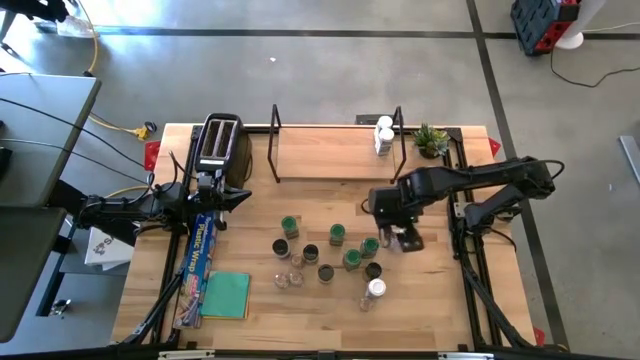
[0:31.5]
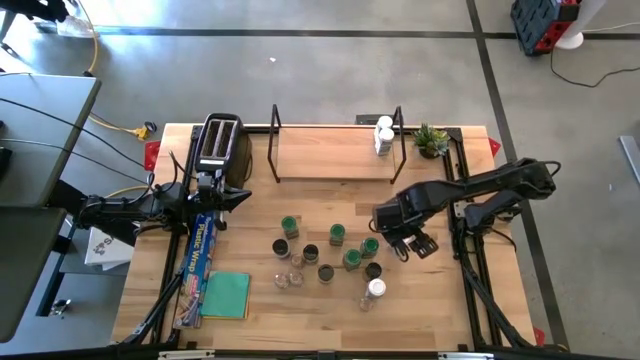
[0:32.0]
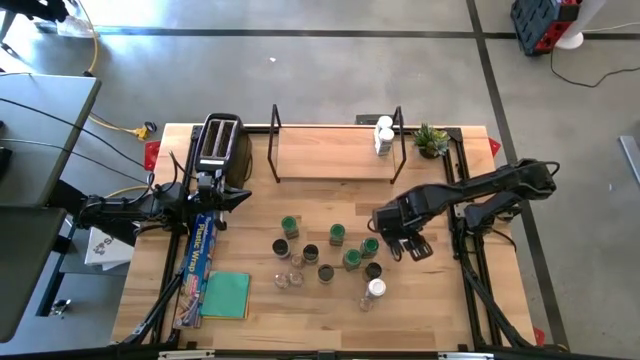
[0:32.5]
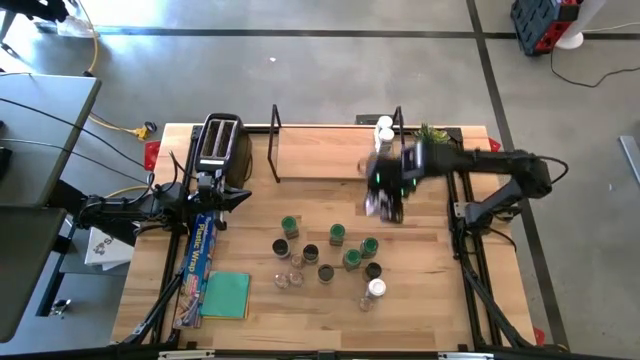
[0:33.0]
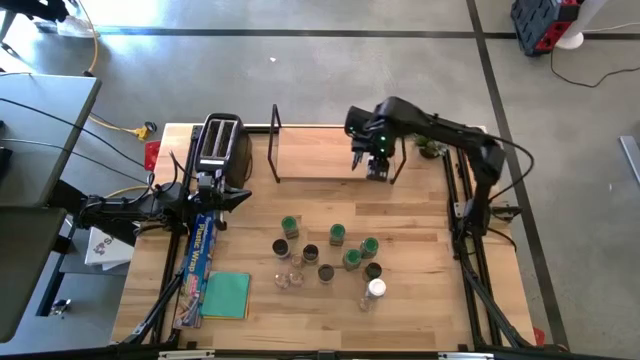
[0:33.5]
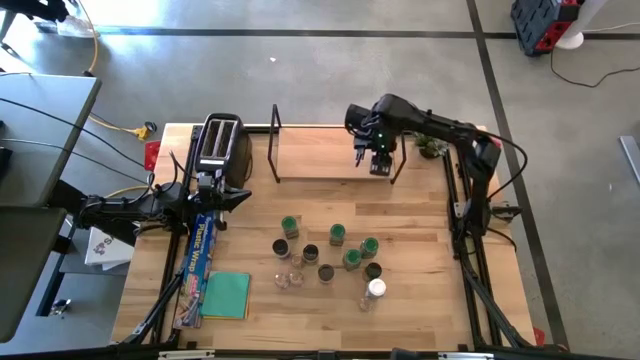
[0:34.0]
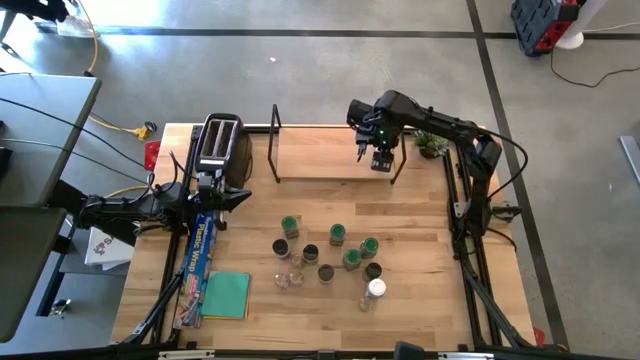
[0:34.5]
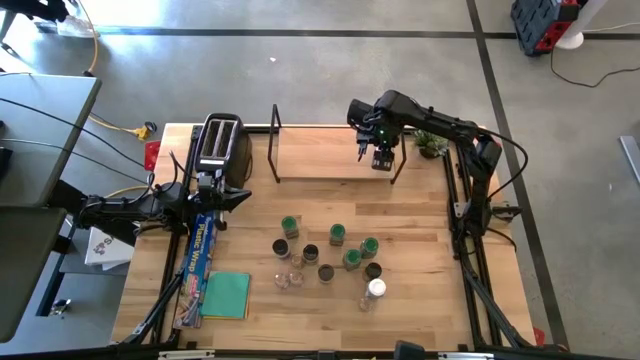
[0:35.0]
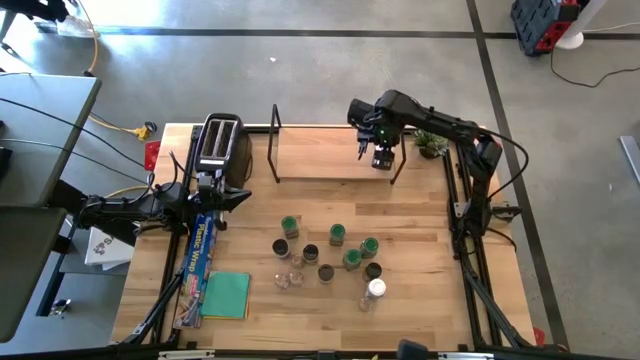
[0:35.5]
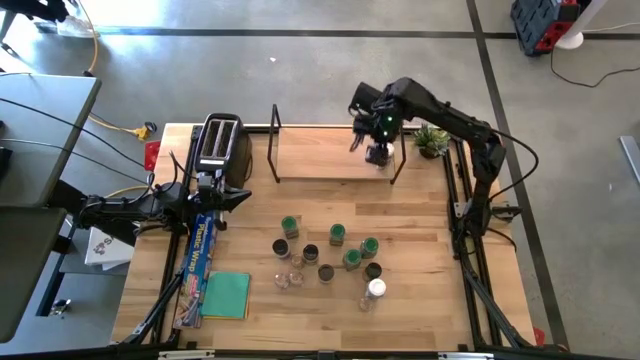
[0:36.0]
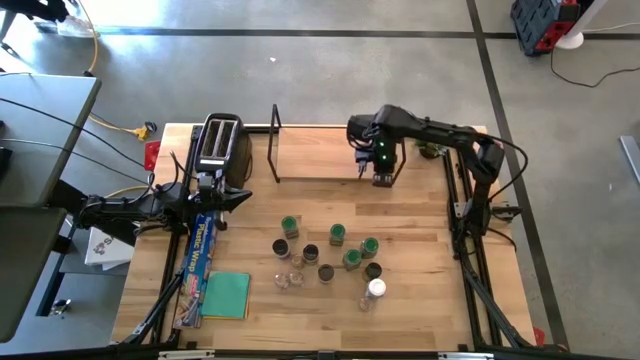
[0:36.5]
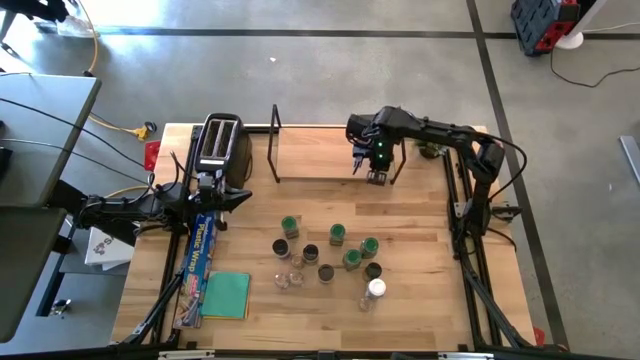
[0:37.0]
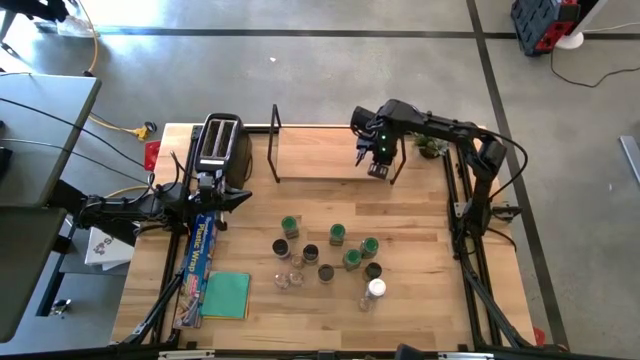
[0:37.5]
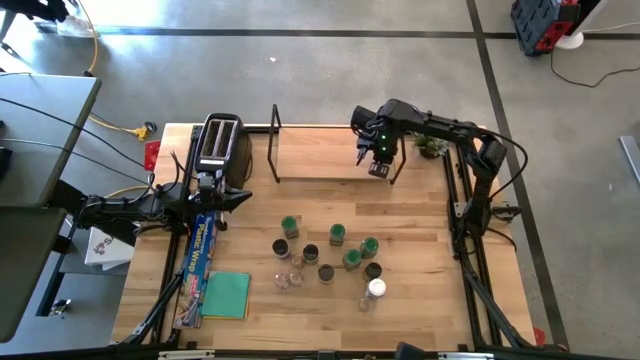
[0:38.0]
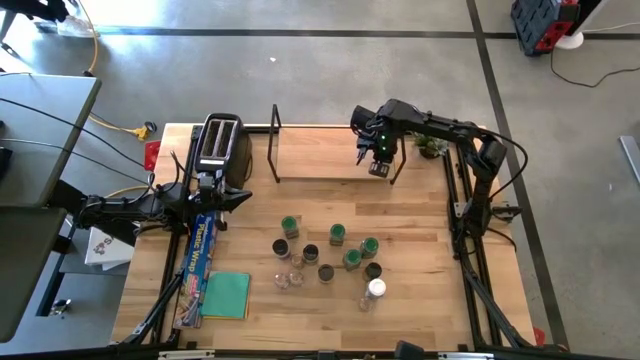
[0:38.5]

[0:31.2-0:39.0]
Task: Shelf spices
Put the white seasoning bottle on the shelf and align it with the other white seasoning bottles

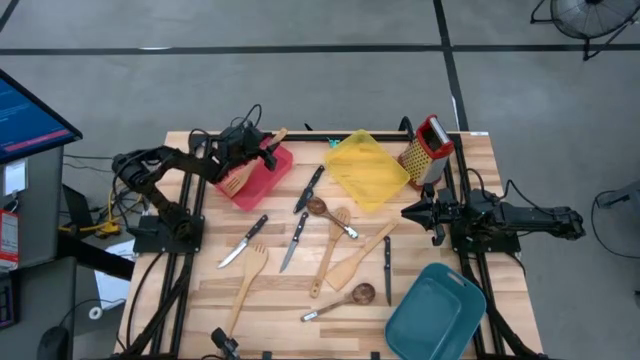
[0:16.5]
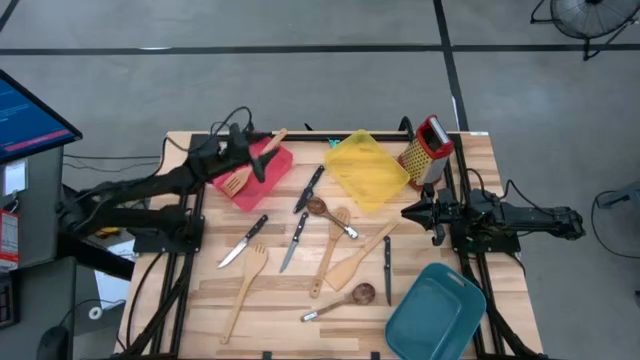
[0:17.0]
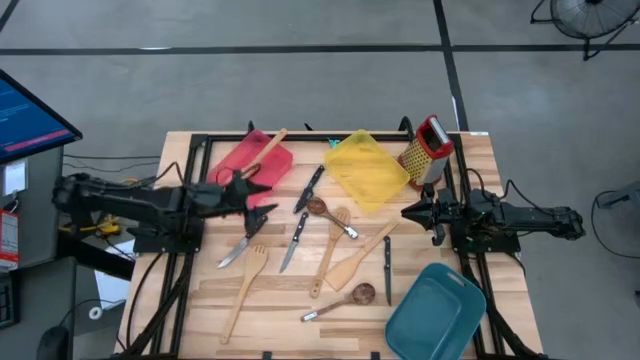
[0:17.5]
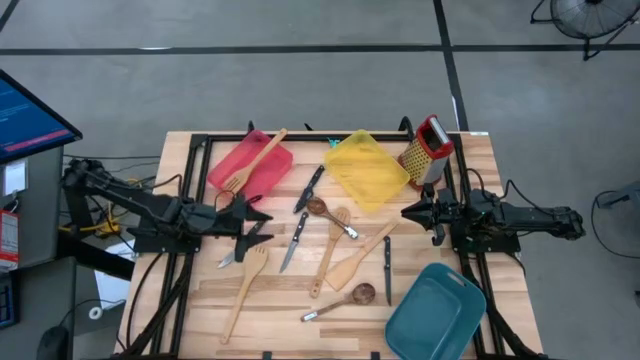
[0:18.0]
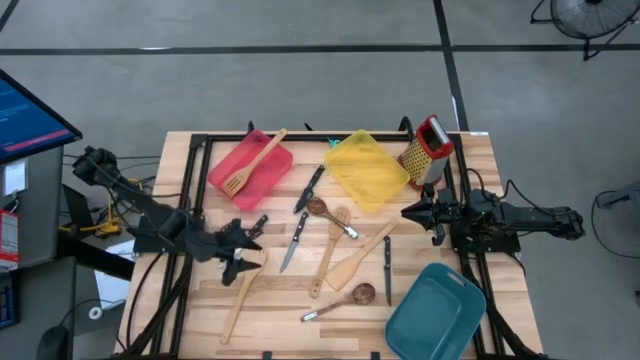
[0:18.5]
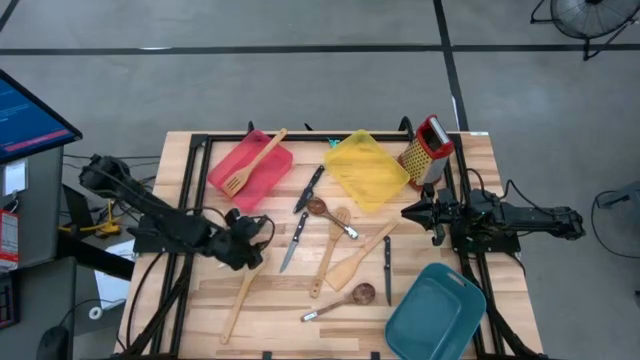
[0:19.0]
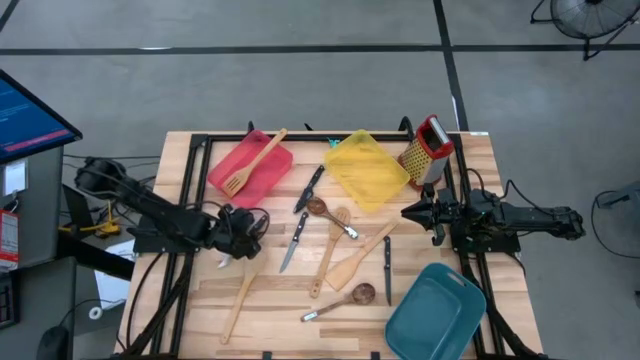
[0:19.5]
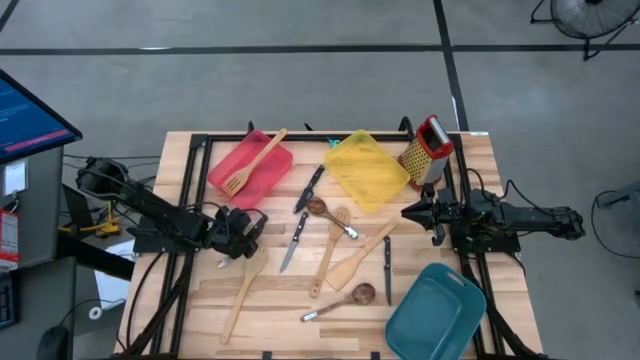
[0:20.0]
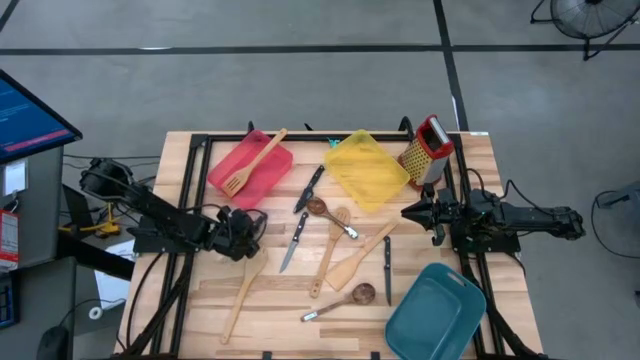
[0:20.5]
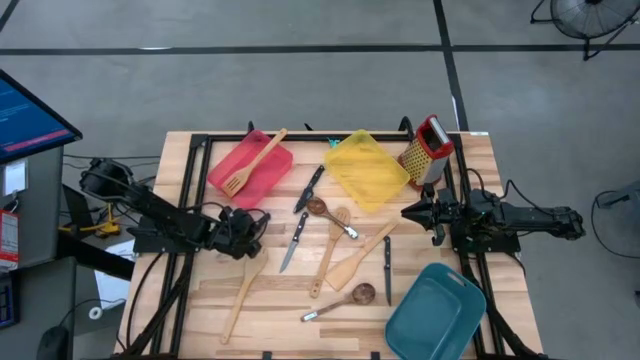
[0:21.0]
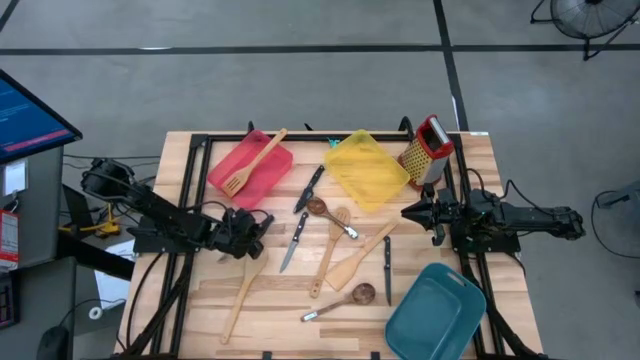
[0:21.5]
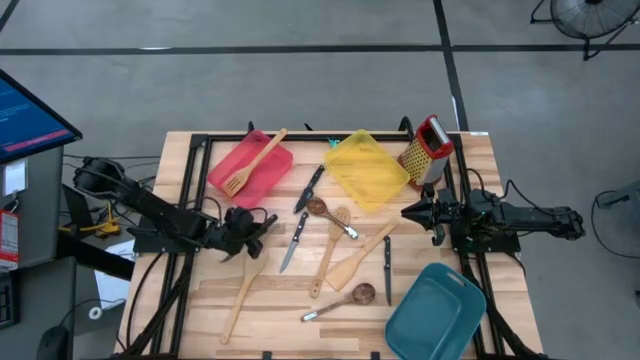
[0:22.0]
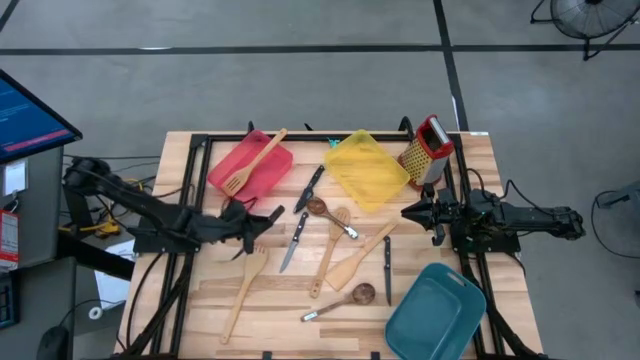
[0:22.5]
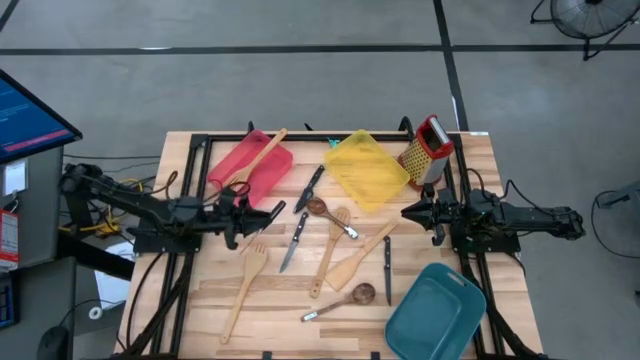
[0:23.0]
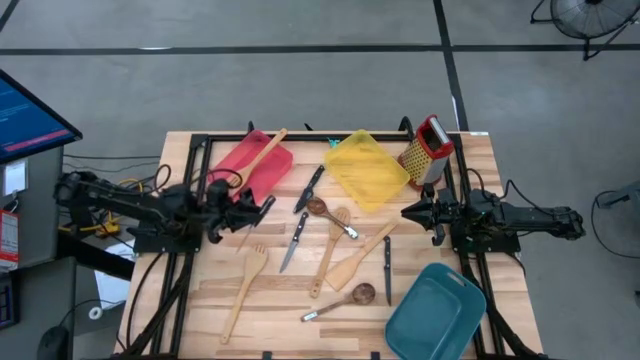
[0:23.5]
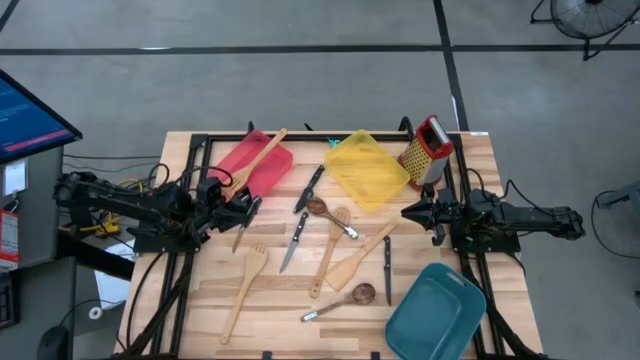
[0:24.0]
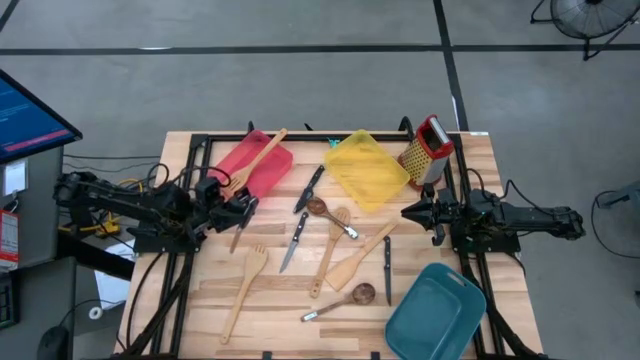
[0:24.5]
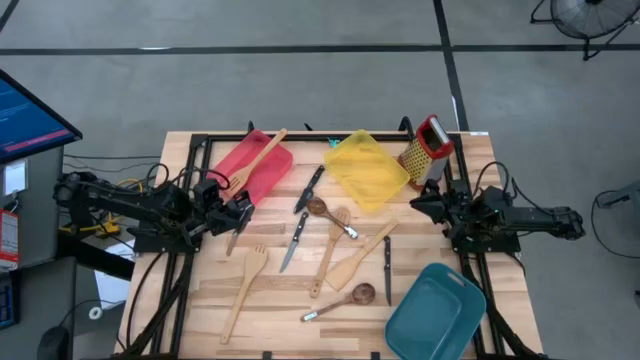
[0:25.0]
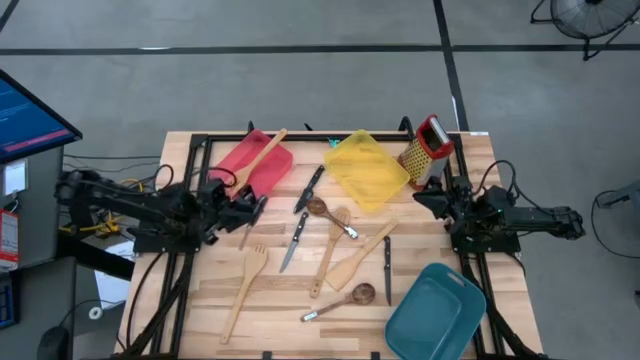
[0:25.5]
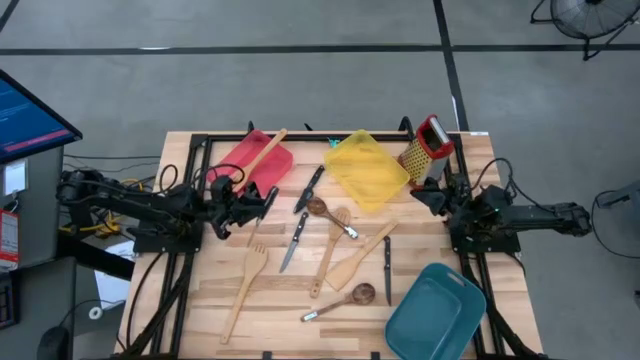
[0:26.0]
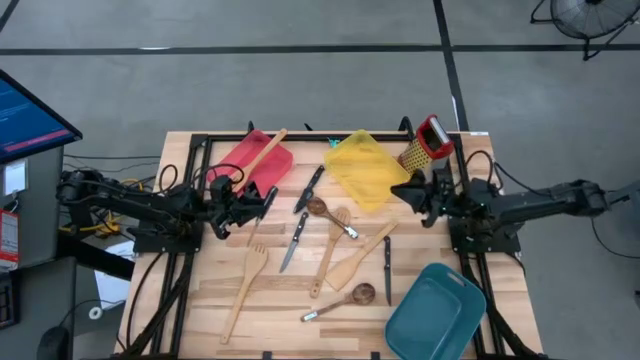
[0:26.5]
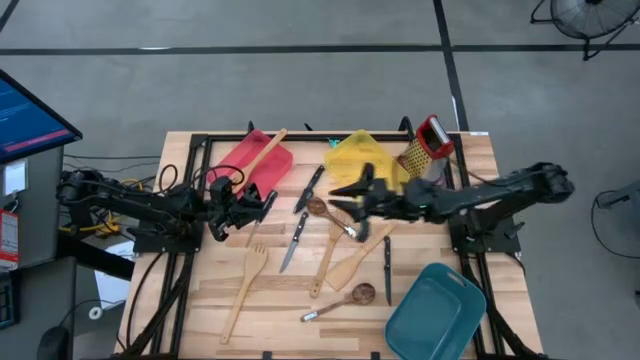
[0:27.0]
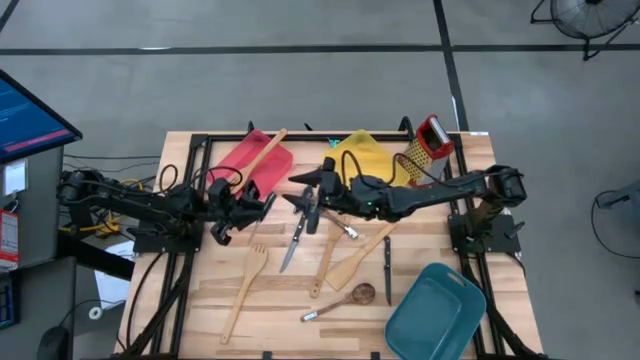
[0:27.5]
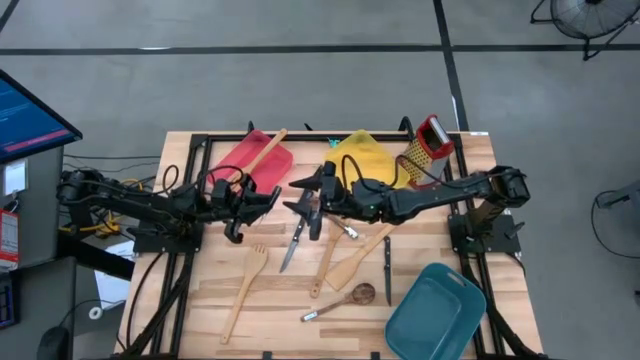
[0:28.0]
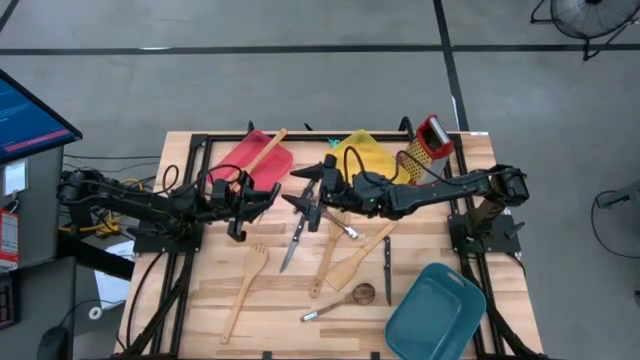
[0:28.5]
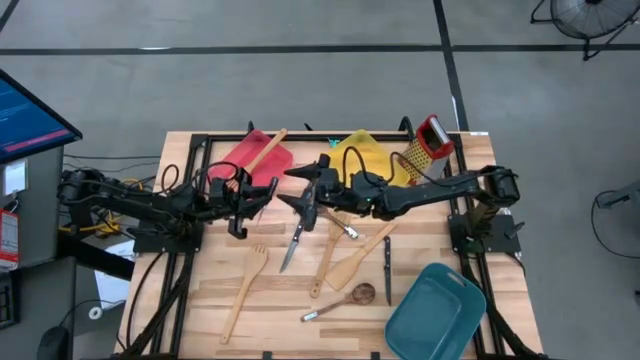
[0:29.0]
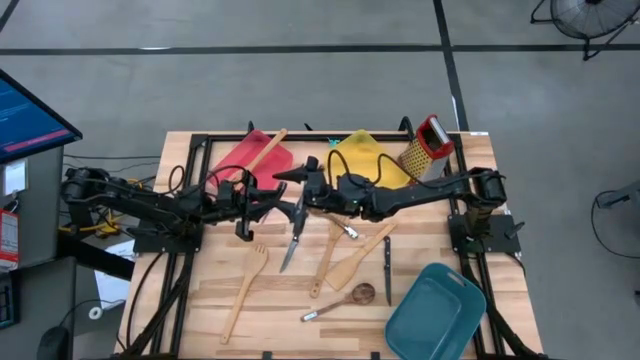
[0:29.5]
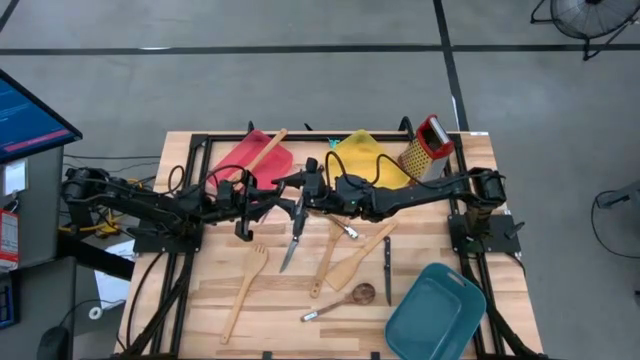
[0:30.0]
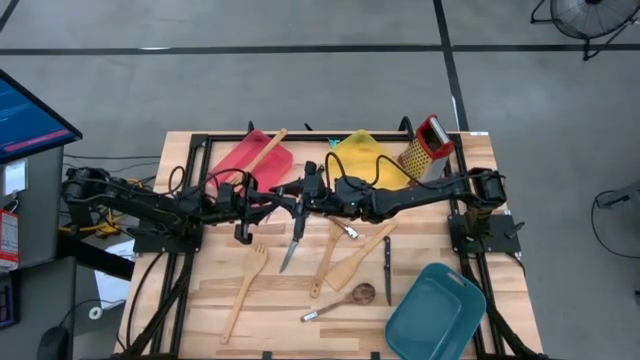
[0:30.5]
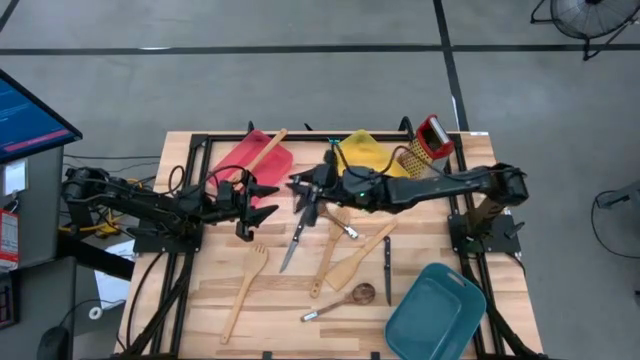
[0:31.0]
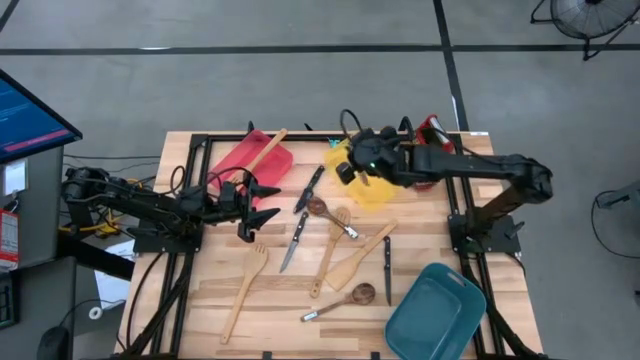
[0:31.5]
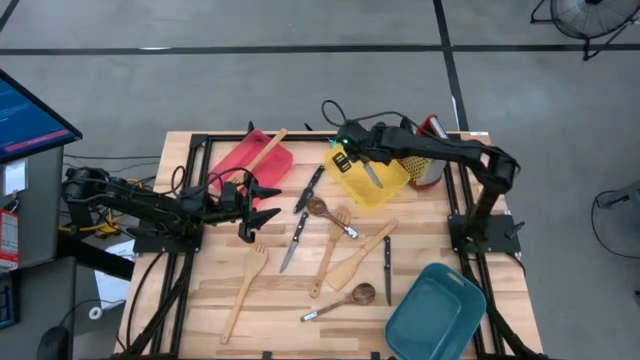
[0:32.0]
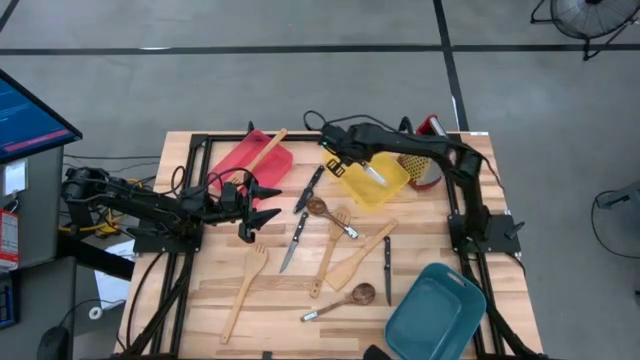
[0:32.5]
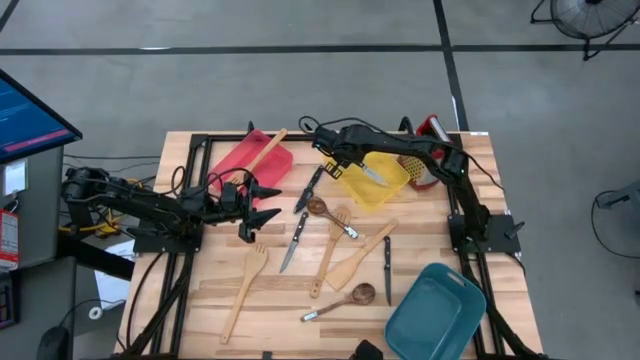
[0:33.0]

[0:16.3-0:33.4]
Task: Pick & Place Kitchen Items
Put the left black knife into the yellow bin
